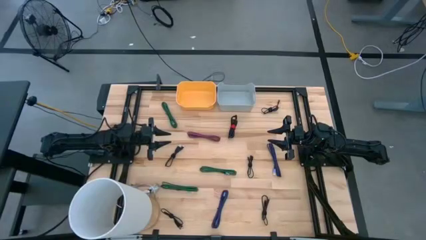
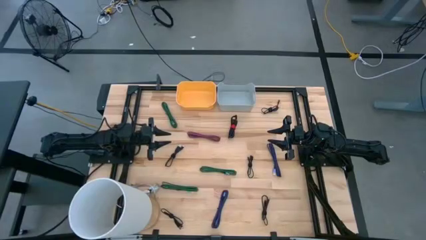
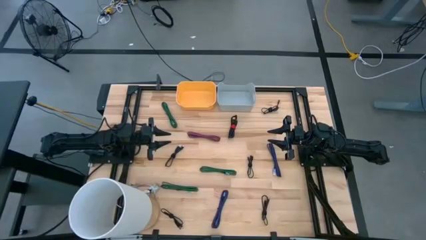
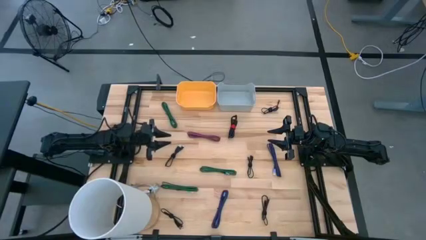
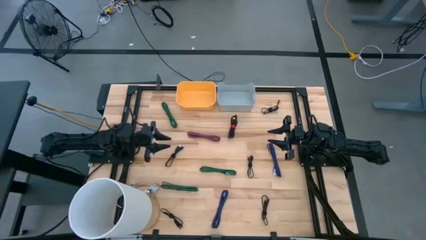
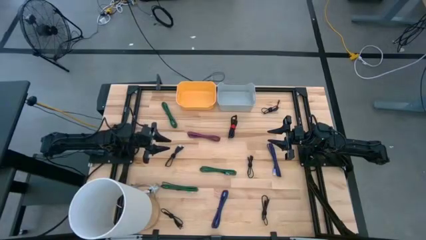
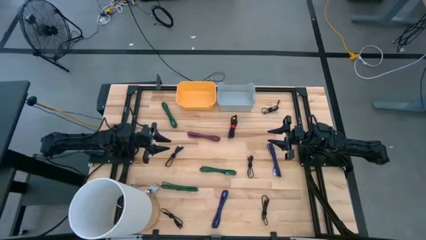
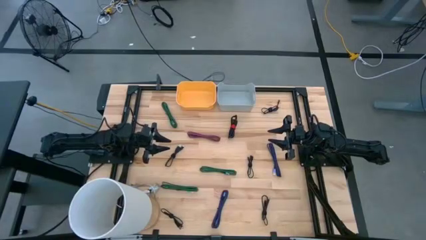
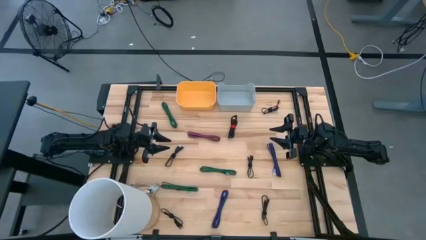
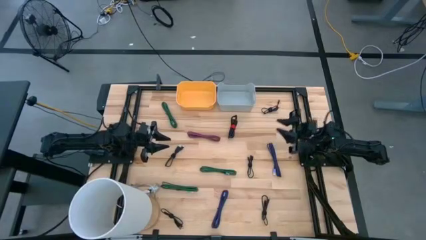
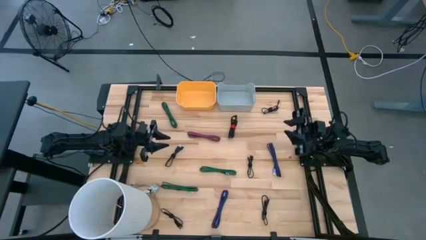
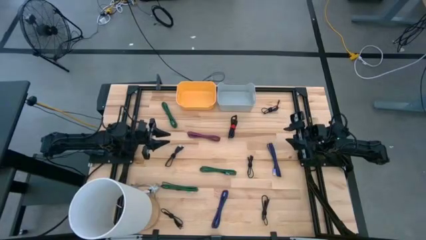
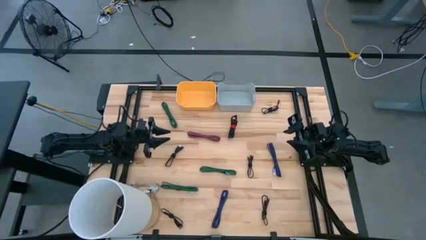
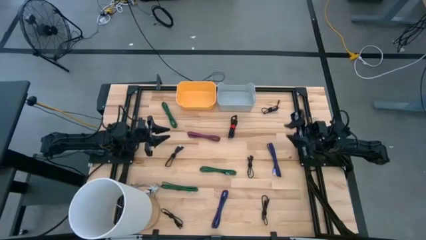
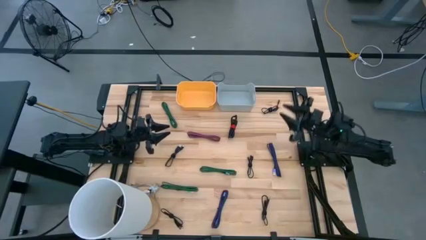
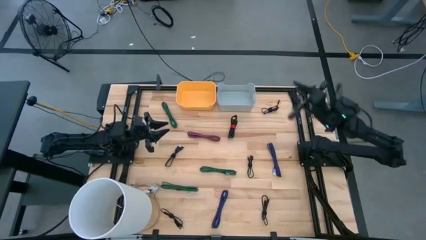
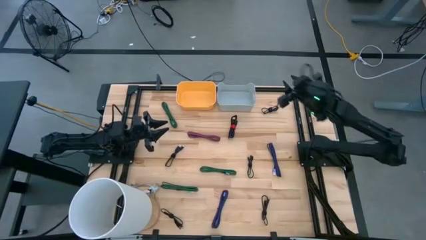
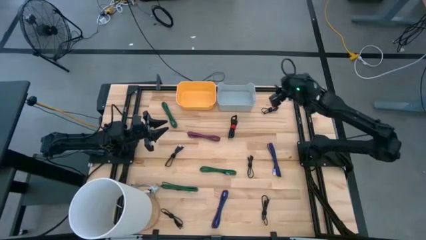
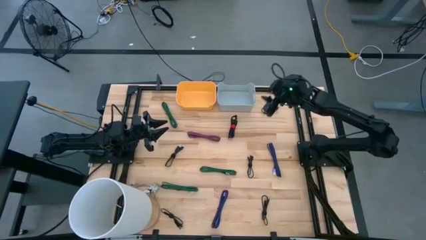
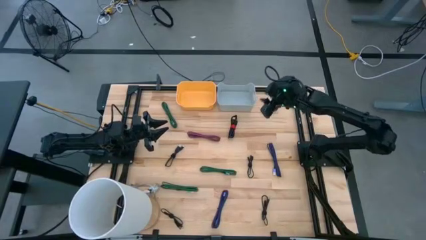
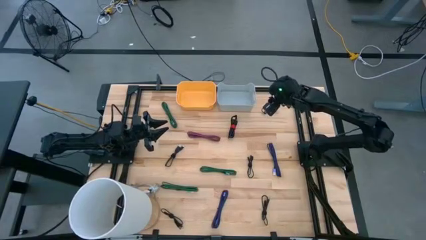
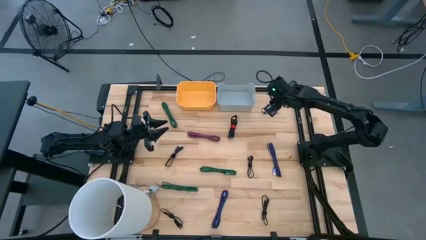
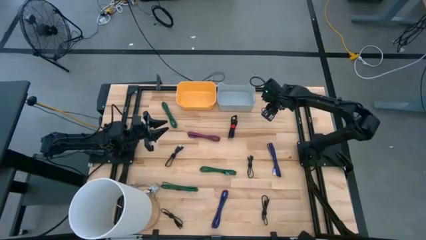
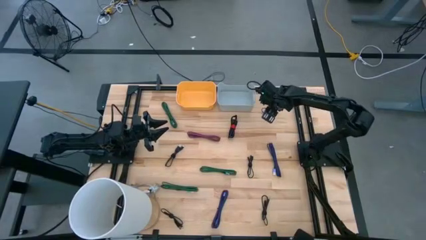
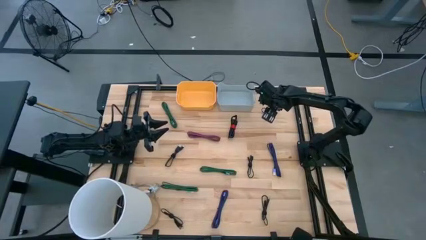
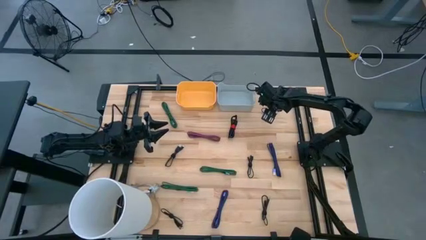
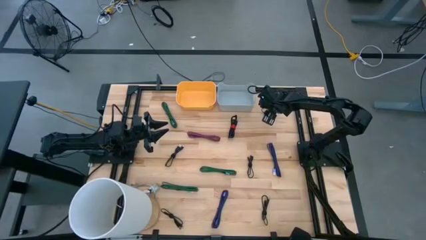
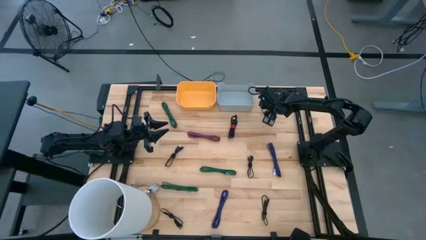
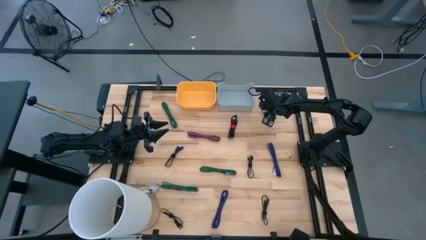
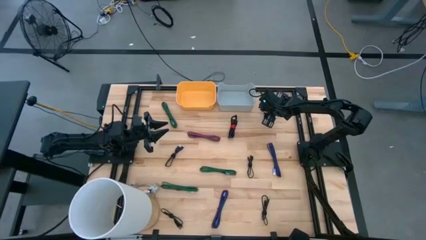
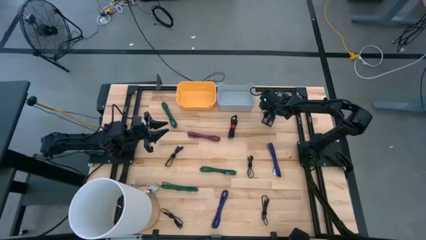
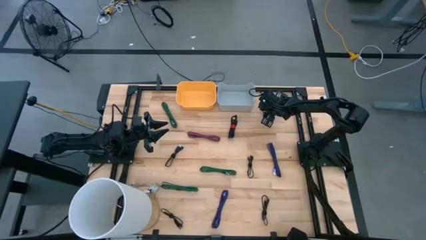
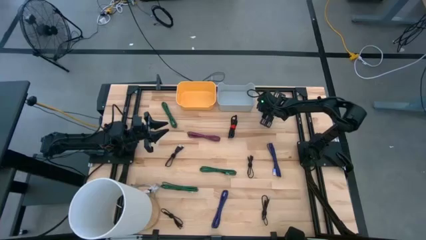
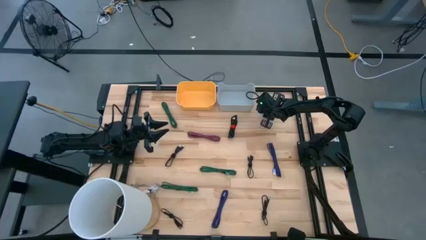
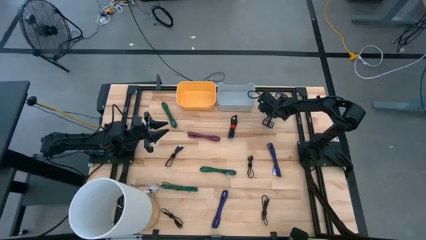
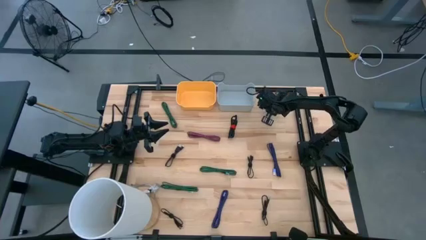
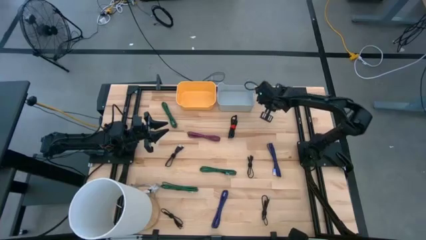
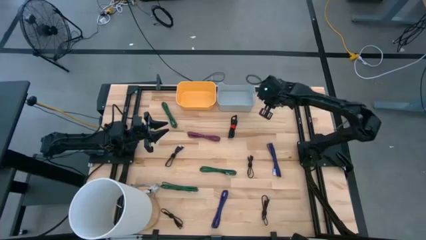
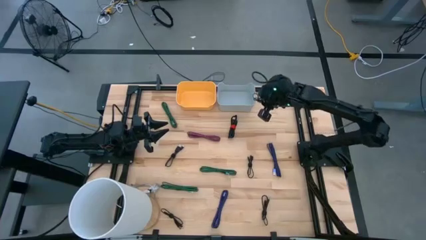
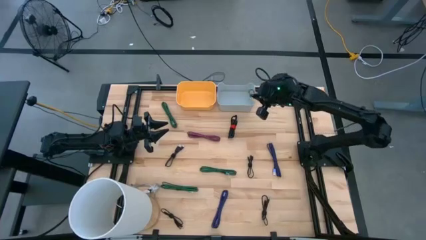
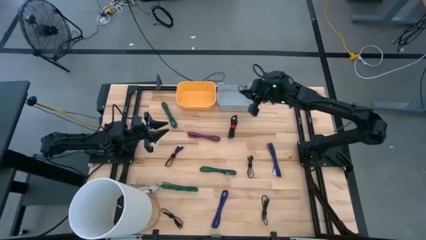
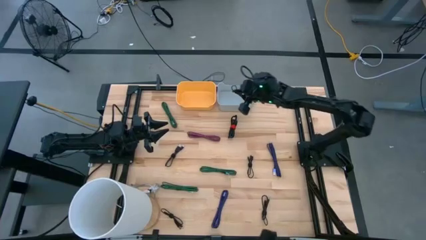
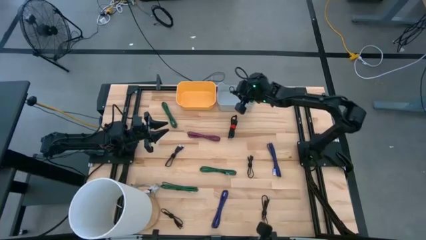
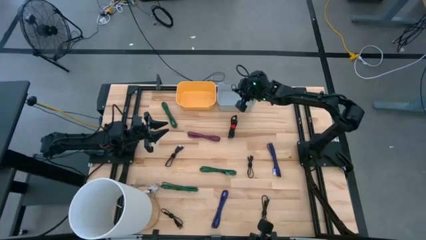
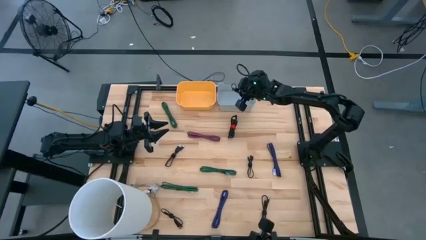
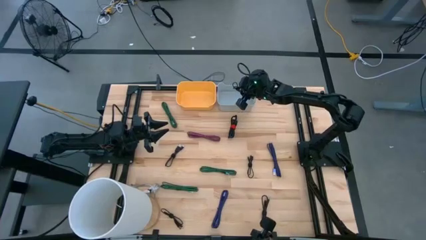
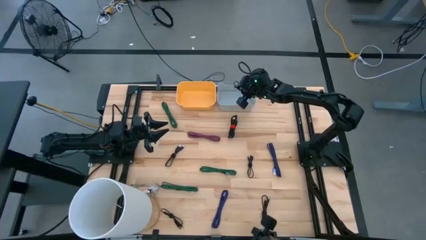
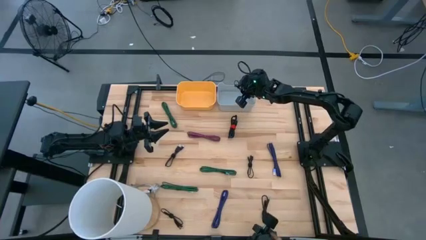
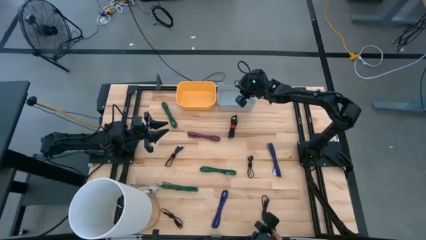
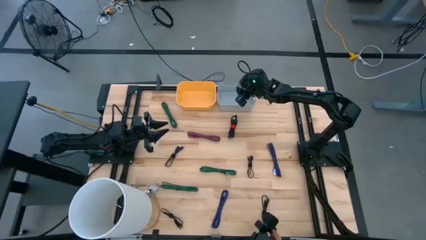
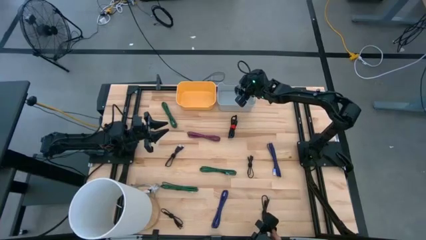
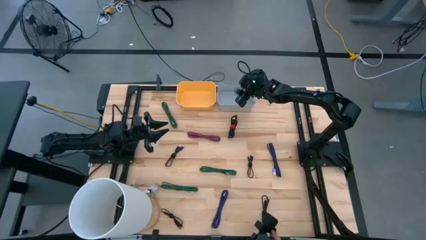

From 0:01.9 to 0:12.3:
Task: Pick & Place USB Port
Put the black charger cable into the gray bin
